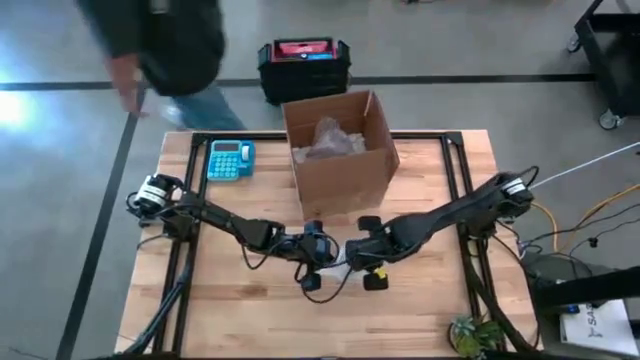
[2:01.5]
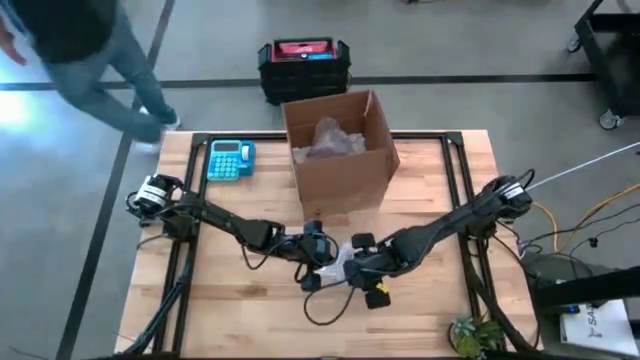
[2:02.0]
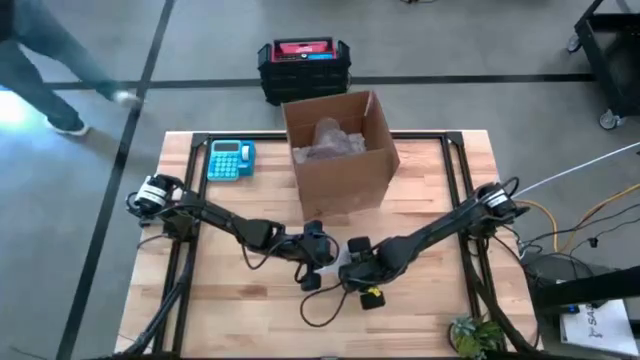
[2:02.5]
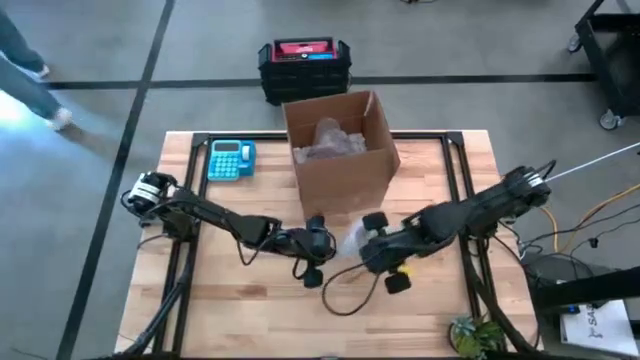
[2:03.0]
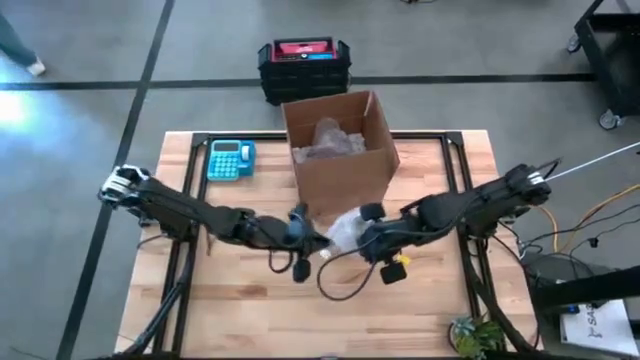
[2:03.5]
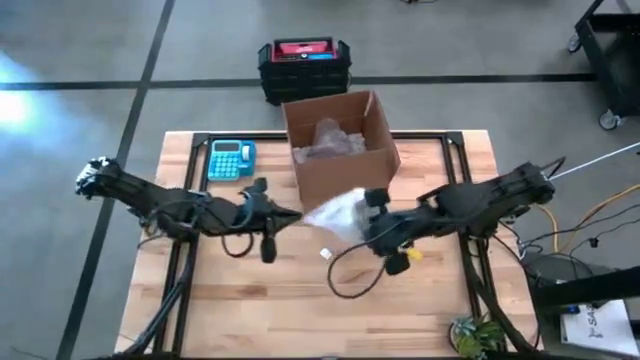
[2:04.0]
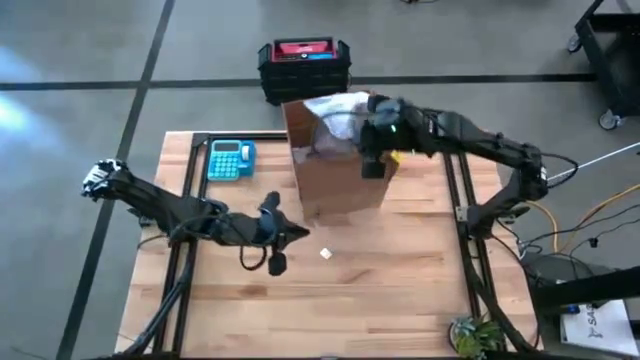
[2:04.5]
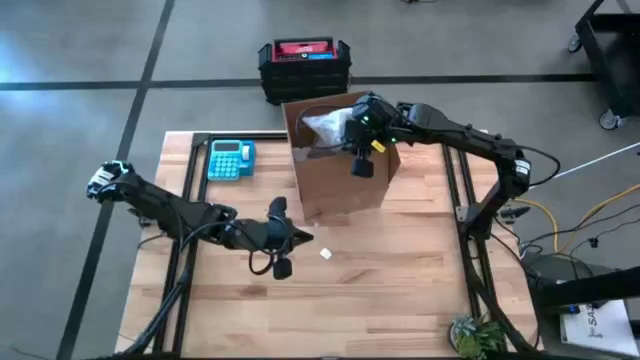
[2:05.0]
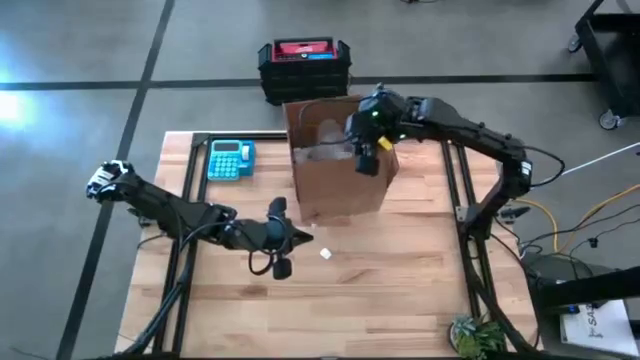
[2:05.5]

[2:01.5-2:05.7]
Task: wrap mug
Put the wrapped gray mug into the cardboard box

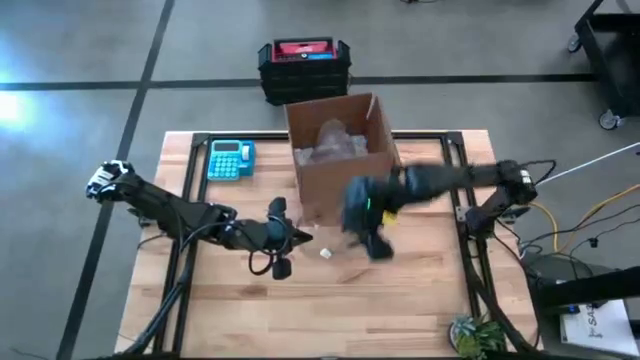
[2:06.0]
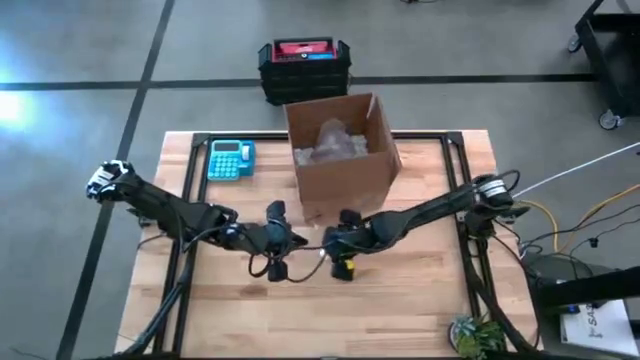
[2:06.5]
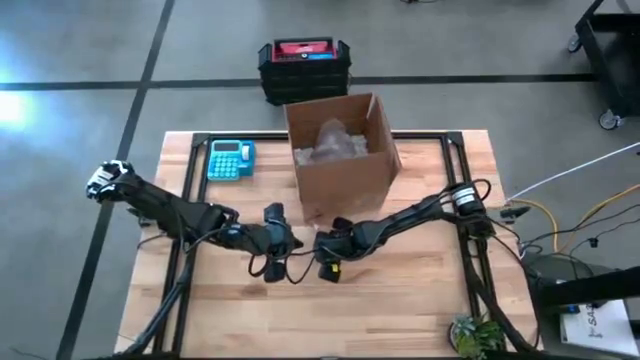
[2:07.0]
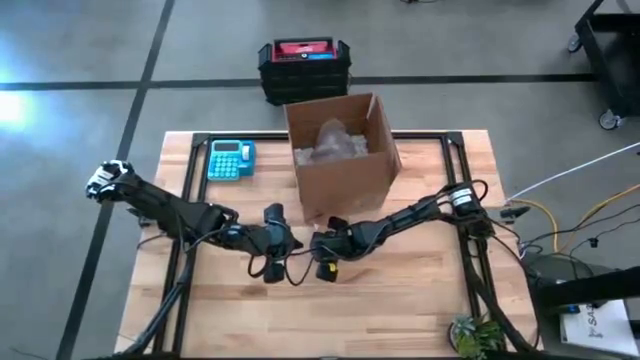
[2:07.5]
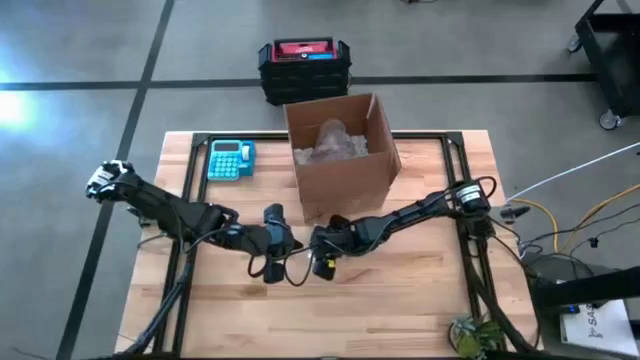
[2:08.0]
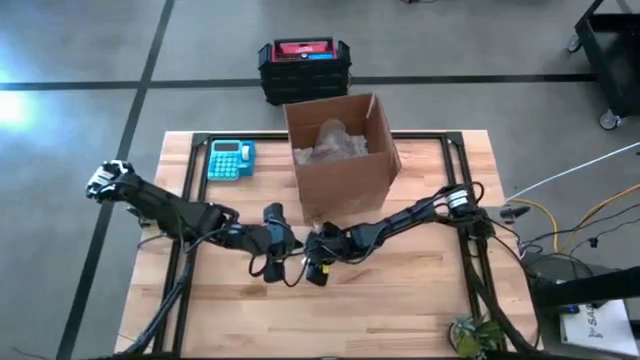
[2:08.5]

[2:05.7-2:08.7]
Put the white styrofoam into the cardboard box

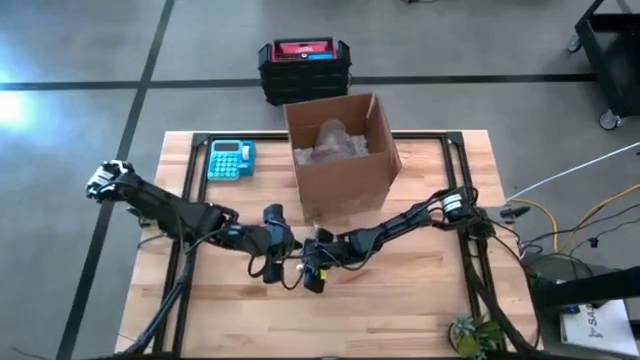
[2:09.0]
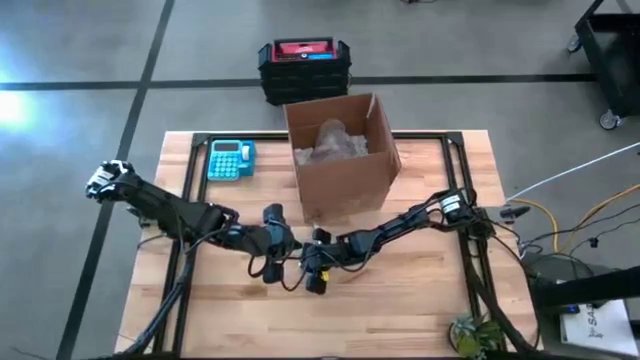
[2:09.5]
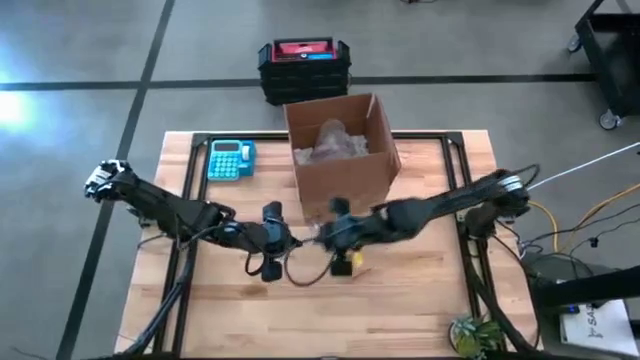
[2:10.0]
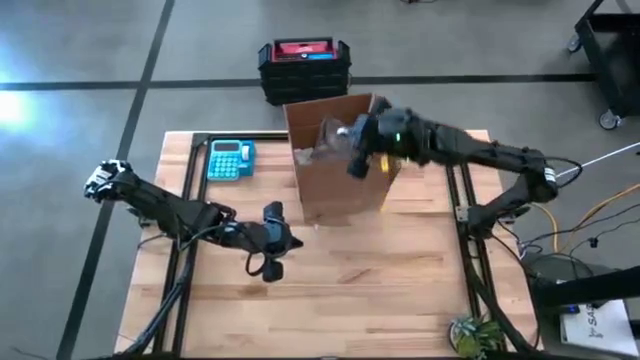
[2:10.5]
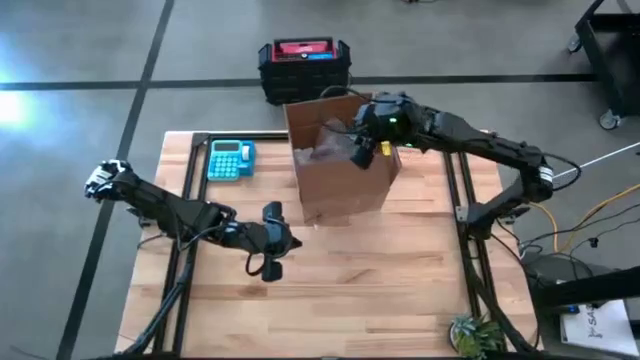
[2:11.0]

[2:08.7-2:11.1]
Put the white styrofoam into the cardboard box

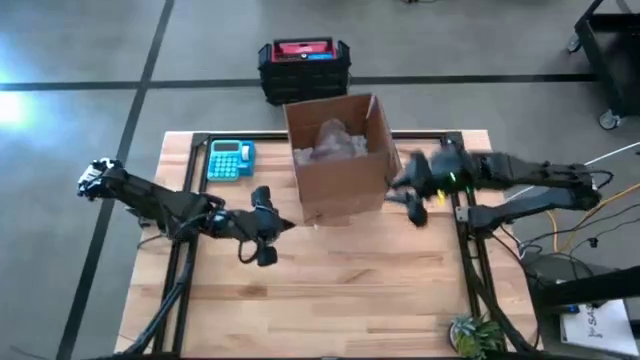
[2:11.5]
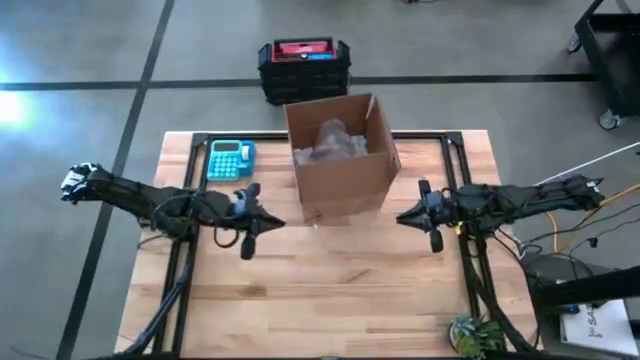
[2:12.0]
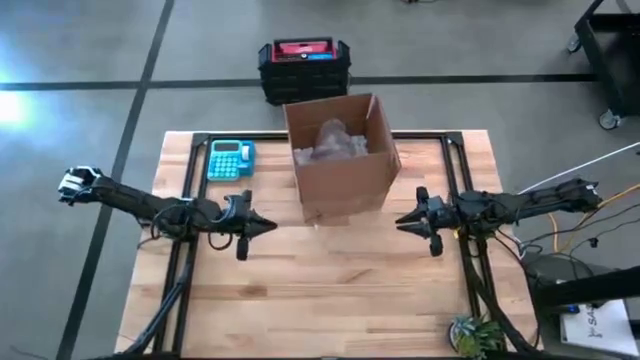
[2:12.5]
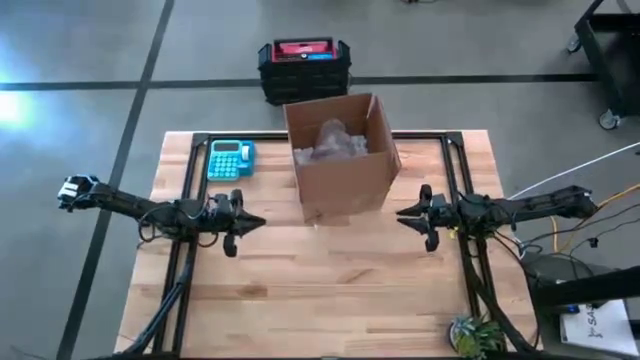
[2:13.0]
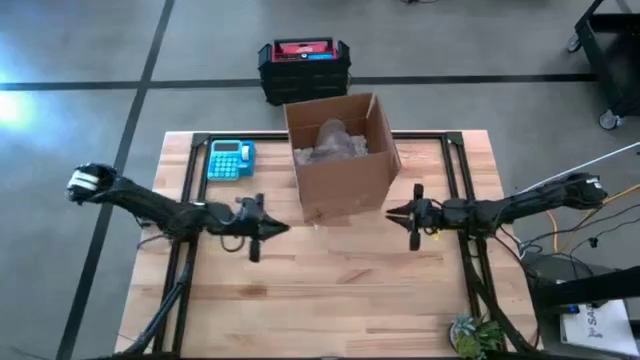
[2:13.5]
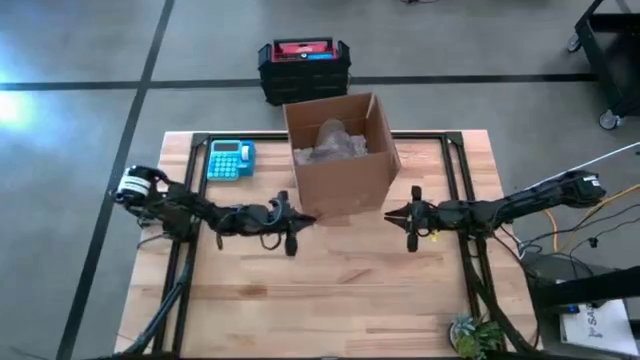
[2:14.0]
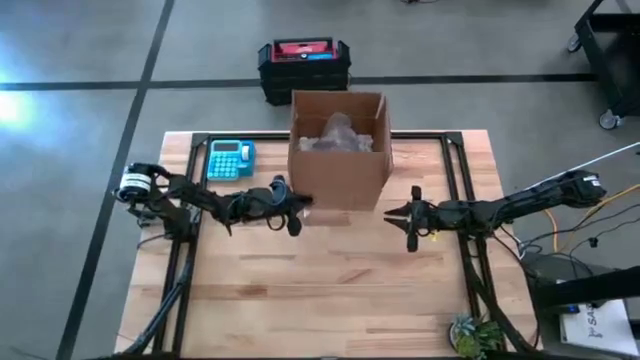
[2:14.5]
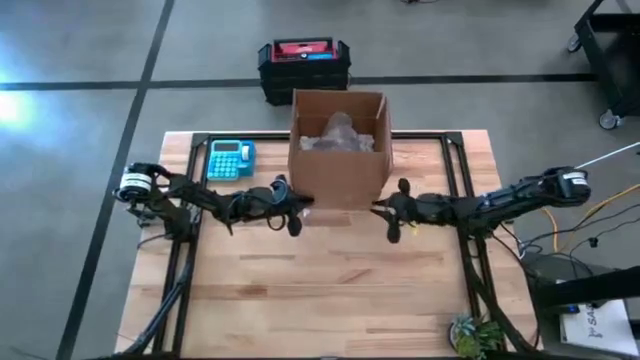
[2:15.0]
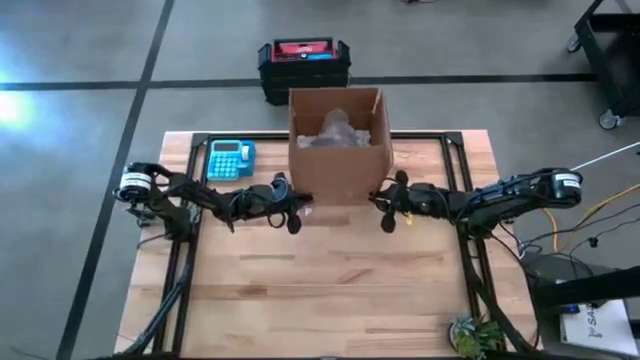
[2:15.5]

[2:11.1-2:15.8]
Adjust the cardboard box

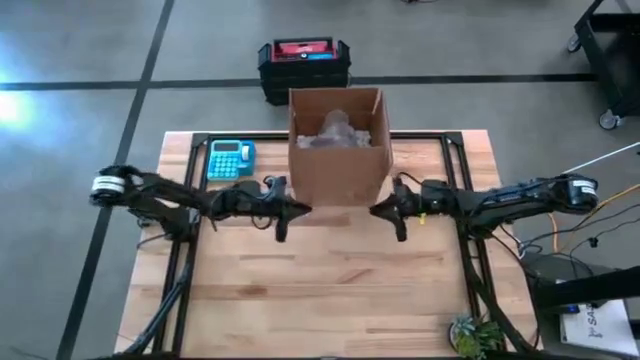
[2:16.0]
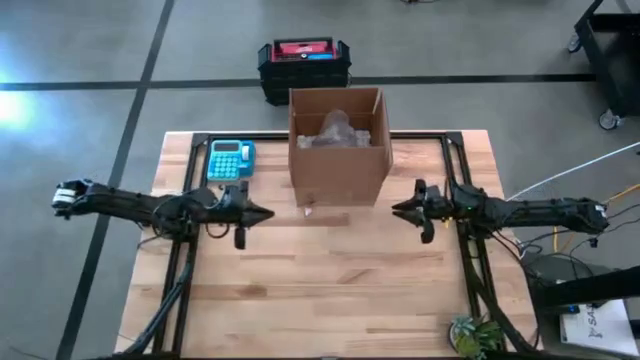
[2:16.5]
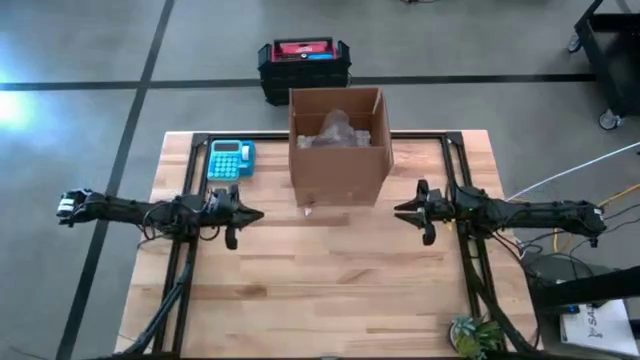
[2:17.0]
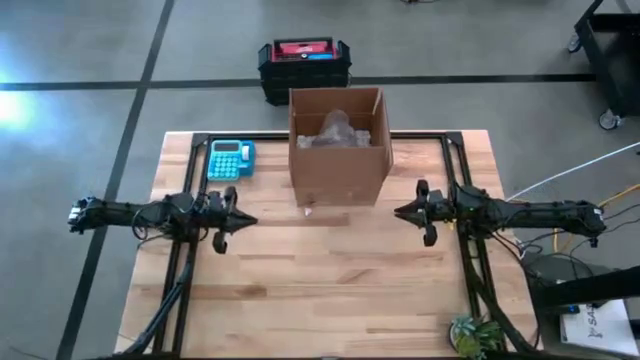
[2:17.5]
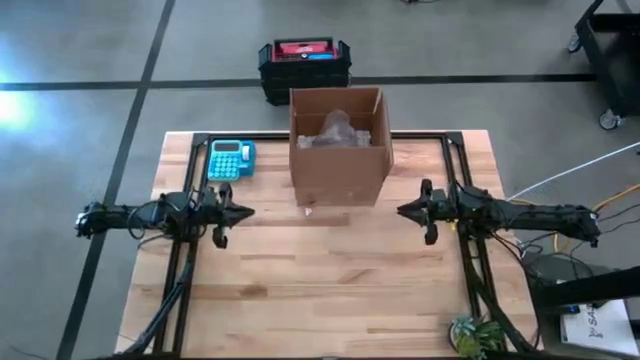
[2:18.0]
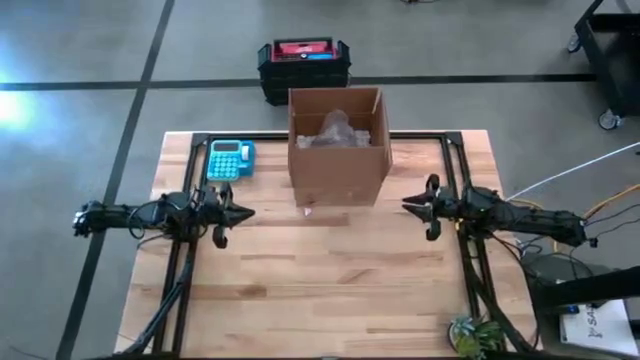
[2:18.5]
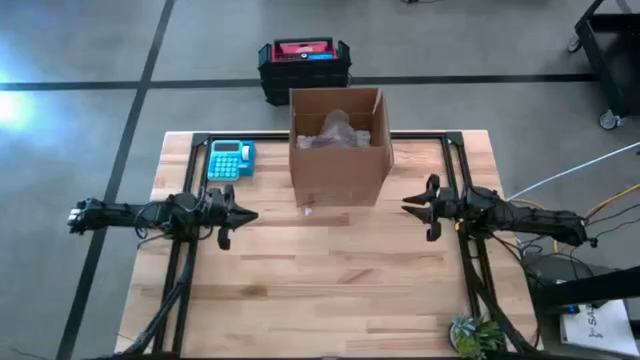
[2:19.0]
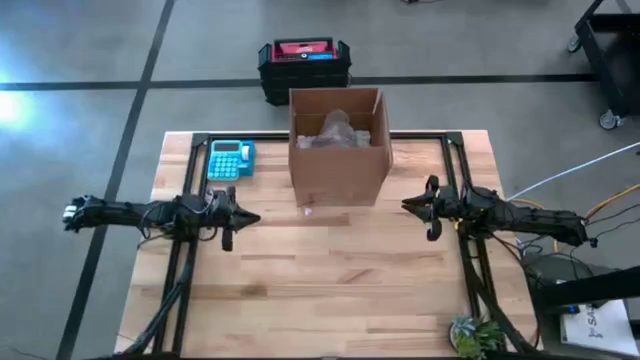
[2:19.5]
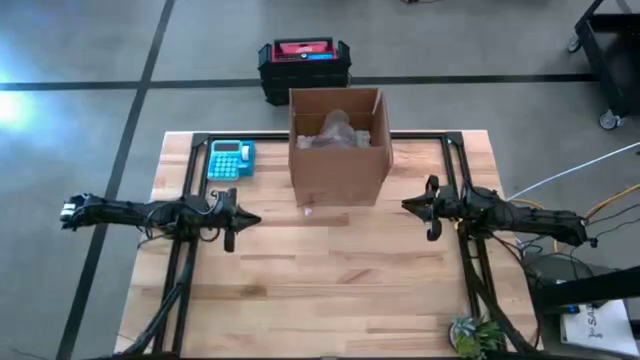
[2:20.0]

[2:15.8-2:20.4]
Return to Home Position

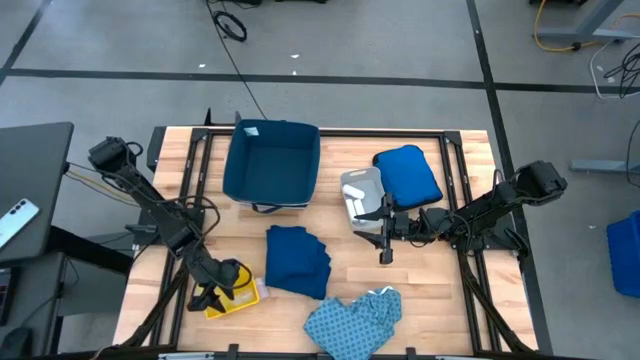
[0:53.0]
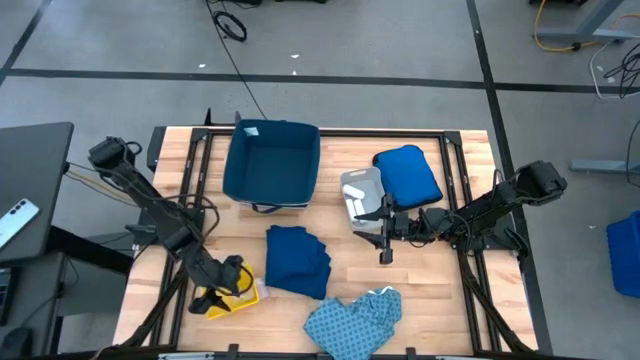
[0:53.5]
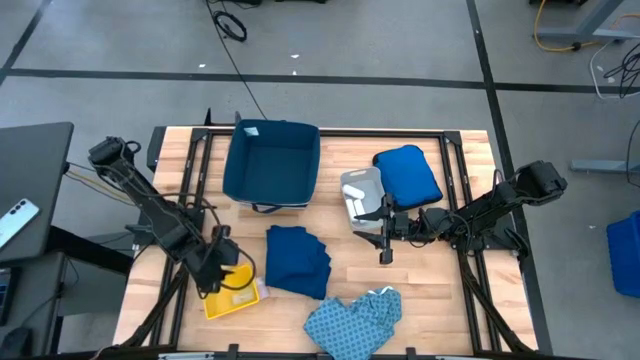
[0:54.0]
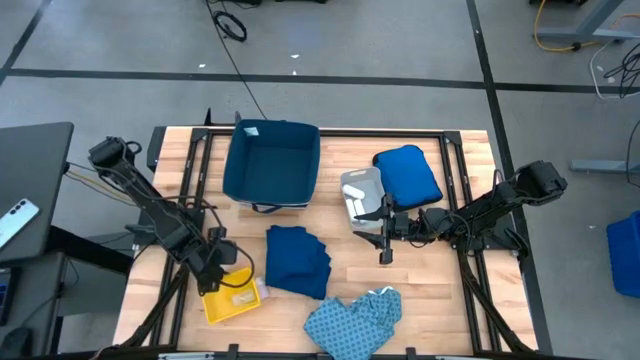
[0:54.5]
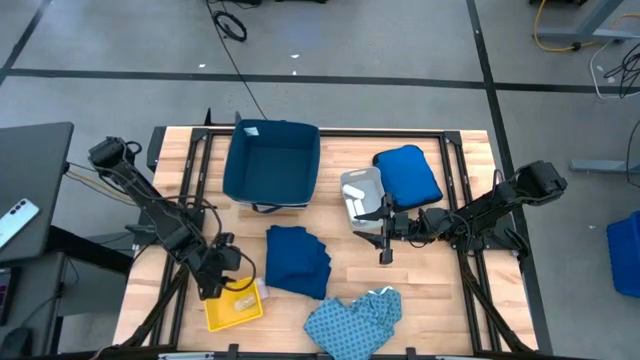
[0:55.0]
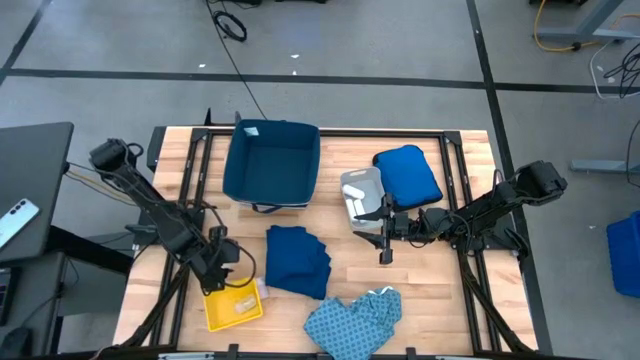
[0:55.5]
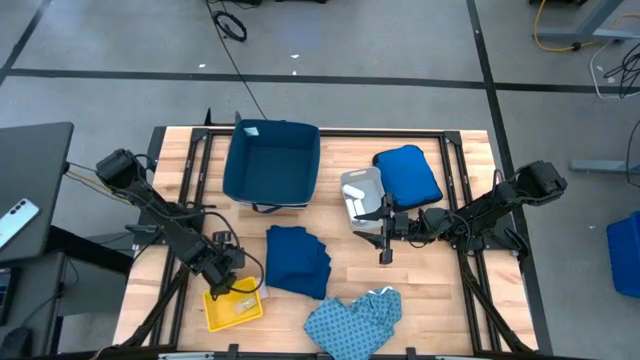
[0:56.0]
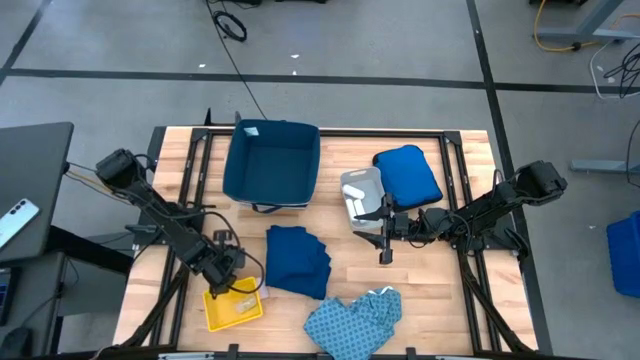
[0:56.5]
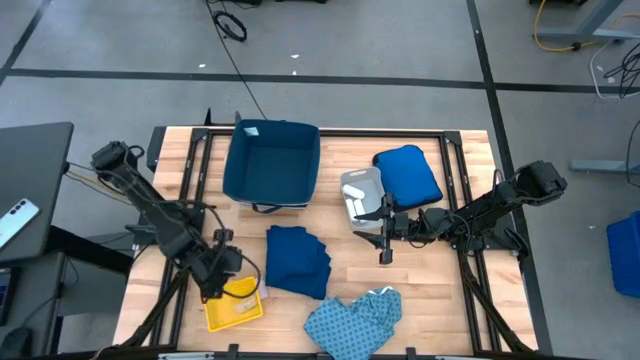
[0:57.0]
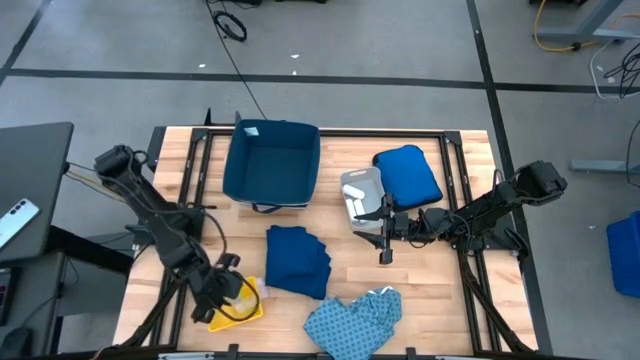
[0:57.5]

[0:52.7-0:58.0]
Task: Pick & place medical supplies in basket/bin
Put the left transparent pill bottle into the yellow bin
